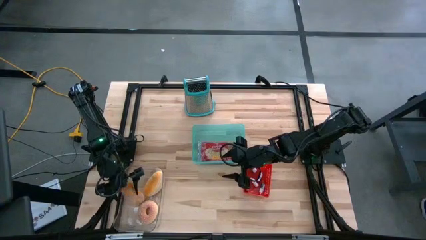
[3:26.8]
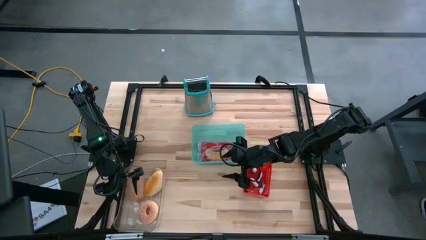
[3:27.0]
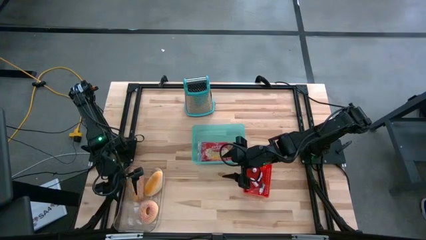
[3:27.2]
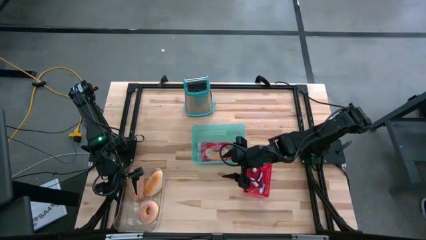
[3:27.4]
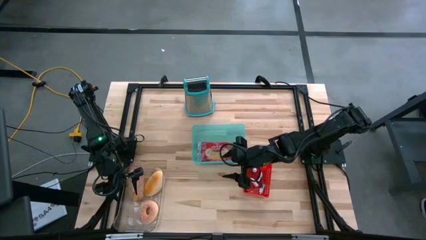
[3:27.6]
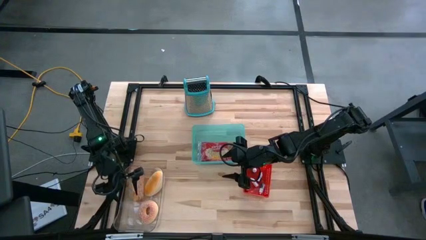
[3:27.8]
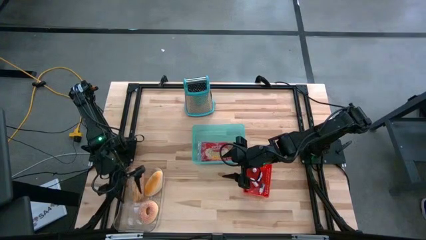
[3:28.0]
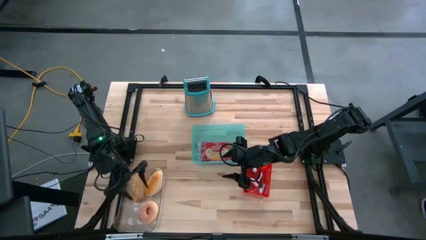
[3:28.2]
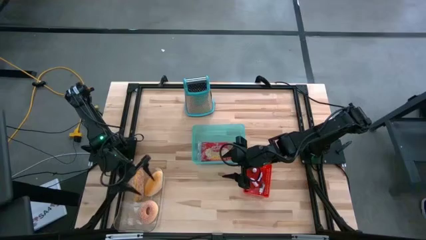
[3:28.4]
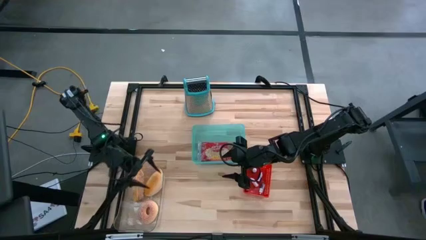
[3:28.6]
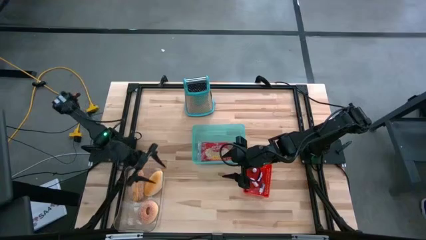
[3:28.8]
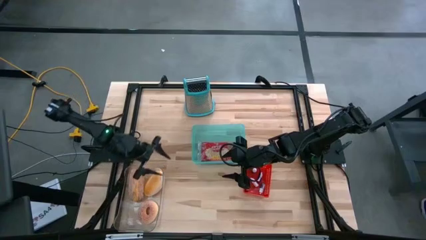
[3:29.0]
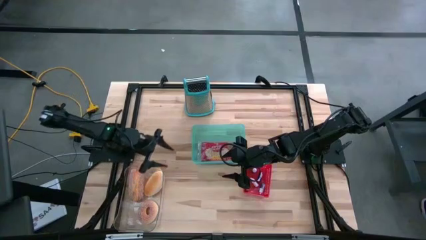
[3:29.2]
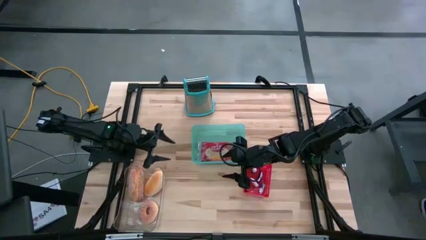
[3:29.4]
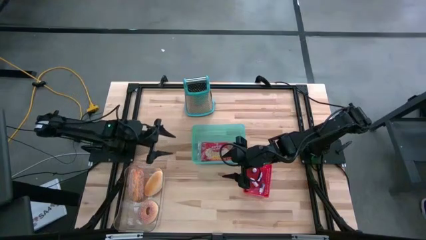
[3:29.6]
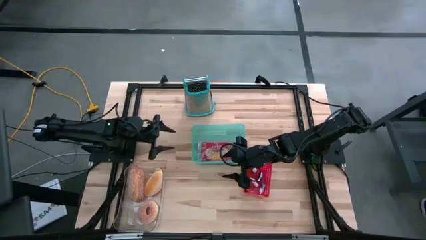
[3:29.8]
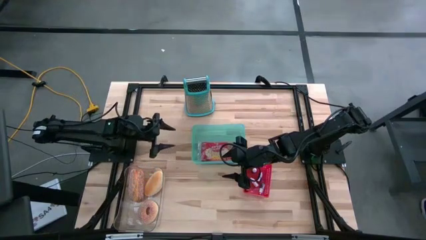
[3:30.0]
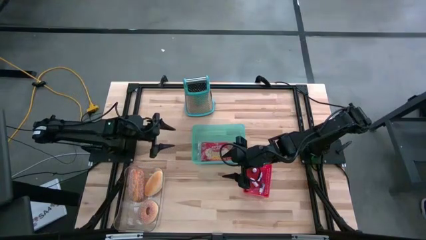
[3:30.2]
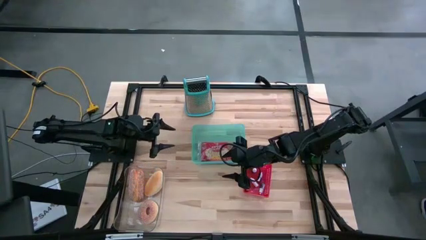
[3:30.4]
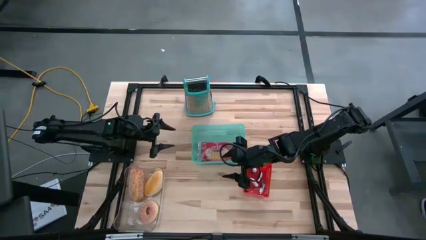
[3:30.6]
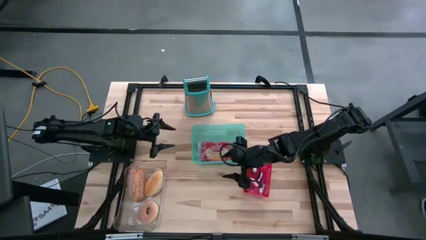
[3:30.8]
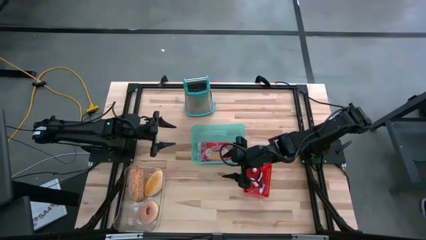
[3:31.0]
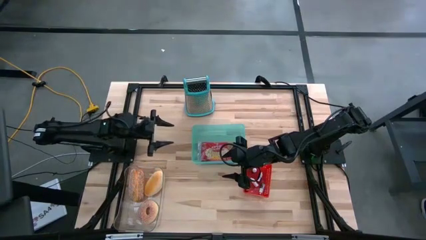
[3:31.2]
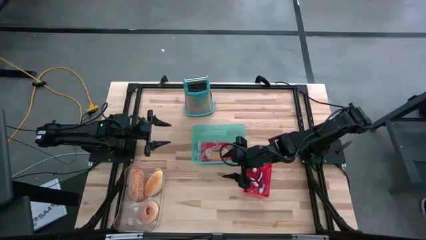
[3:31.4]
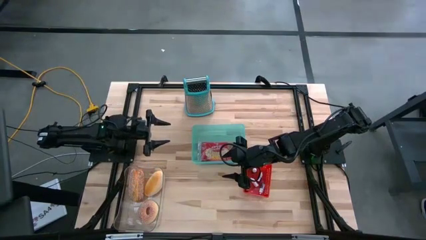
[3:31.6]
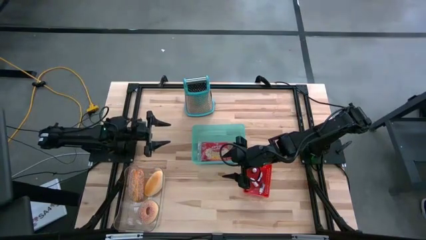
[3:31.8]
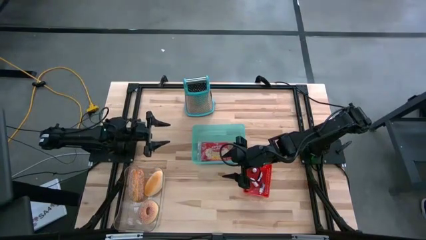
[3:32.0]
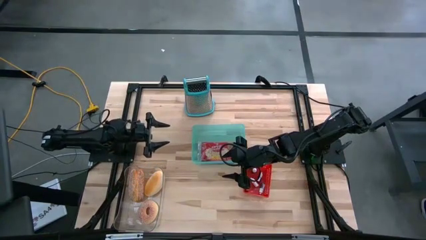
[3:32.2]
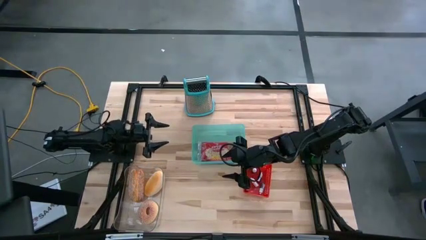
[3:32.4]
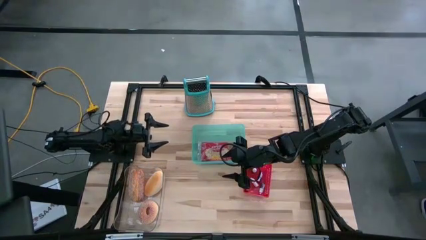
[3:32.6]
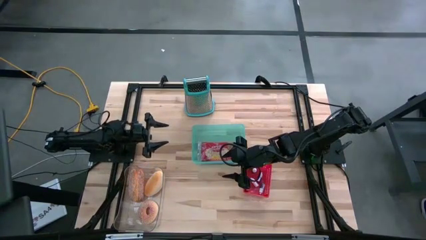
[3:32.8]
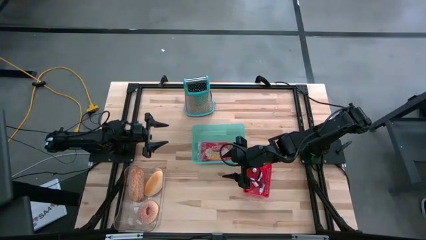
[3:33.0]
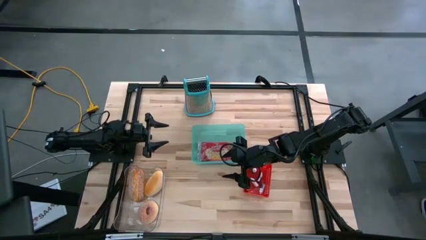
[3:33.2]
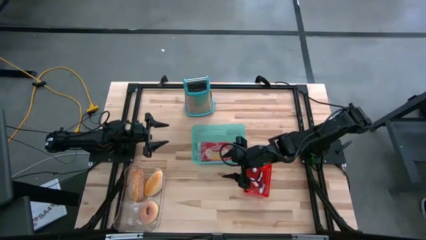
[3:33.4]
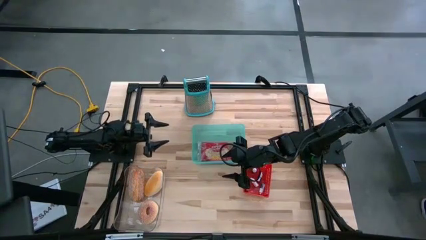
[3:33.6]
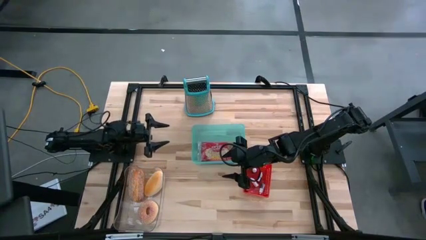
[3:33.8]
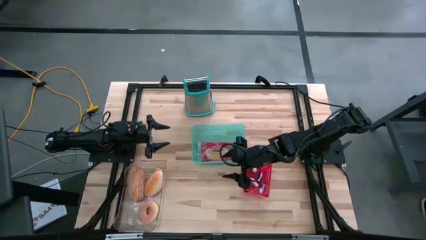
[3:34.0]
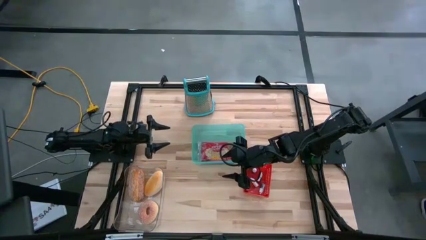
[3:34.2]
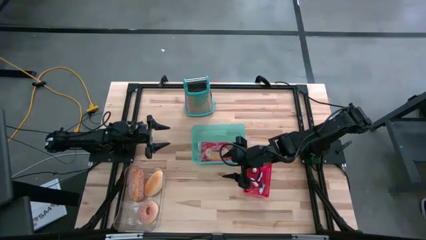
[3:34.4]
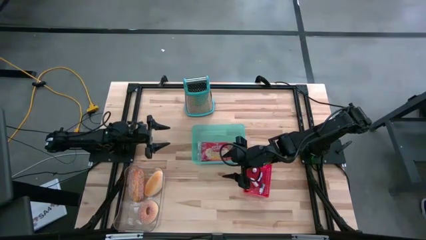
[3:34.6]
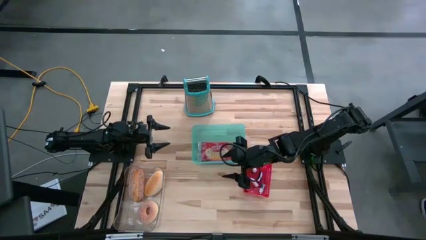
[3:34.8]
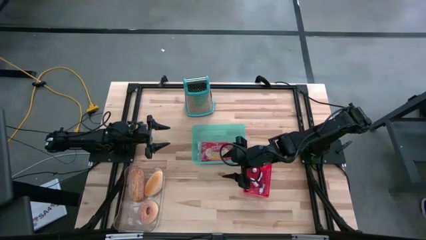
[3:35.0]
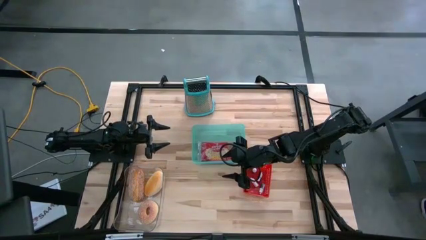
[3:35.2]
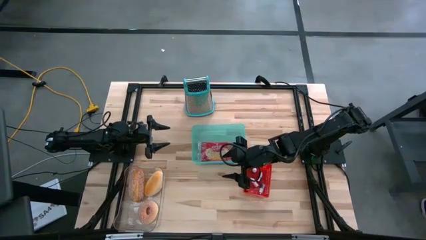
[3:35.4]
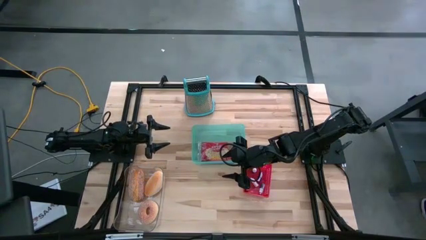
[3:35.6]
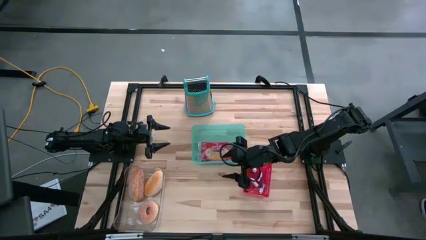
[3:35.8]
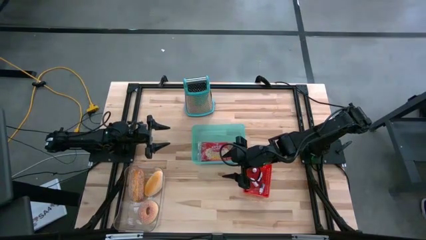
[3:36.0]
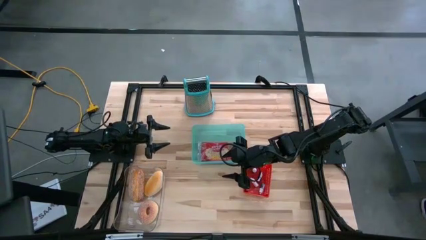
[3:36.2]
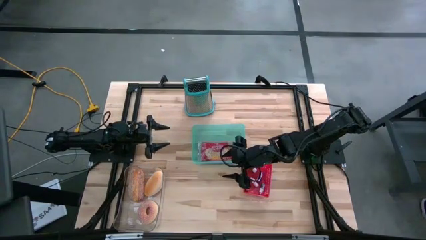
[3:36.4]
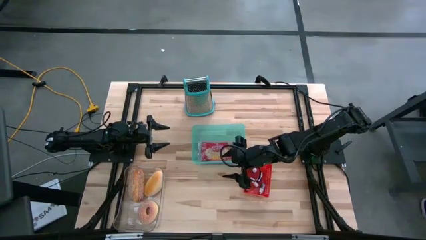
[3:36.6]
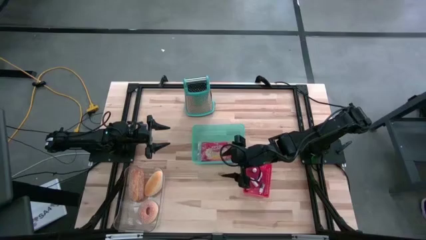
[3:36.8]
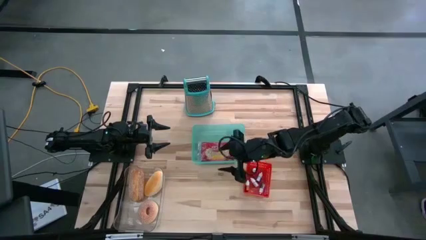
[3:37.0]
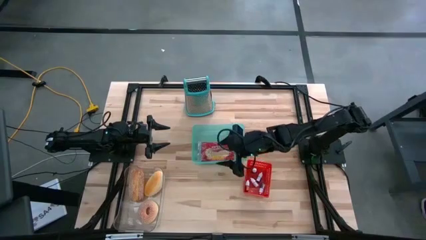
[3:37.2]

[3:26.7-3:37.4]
Task: Pick & Place Food Item
Return to Home Position

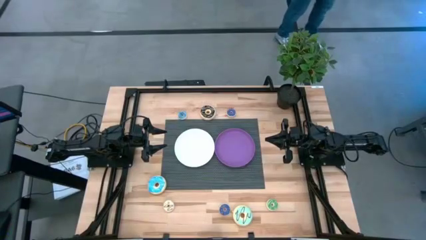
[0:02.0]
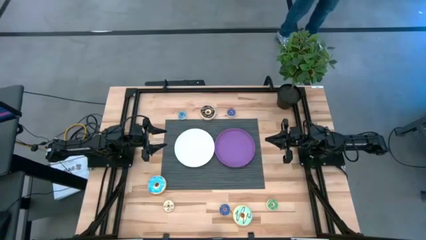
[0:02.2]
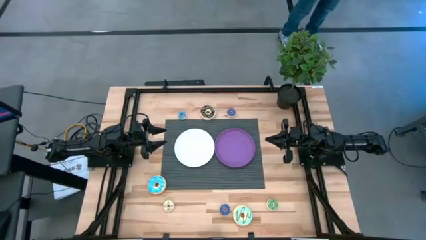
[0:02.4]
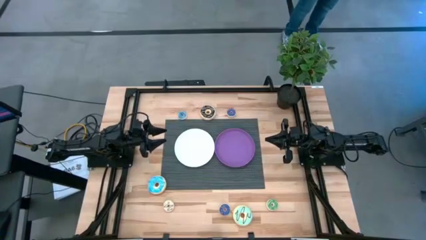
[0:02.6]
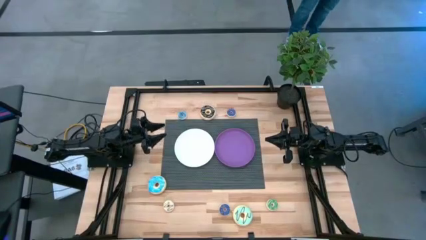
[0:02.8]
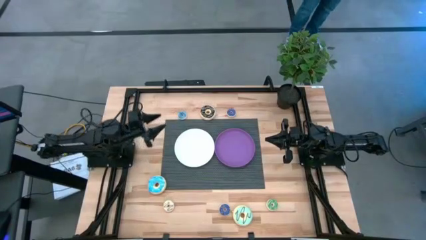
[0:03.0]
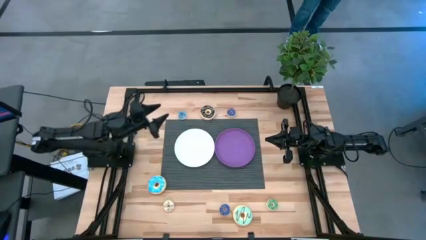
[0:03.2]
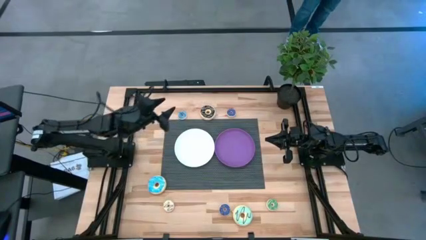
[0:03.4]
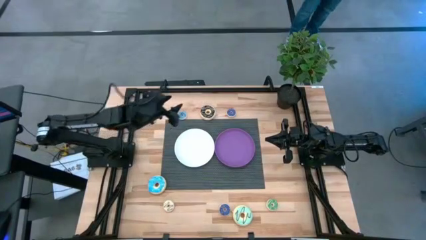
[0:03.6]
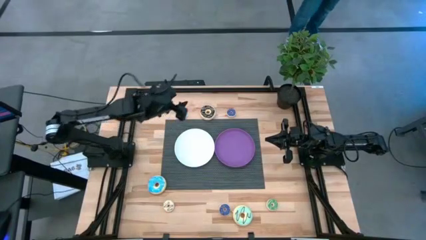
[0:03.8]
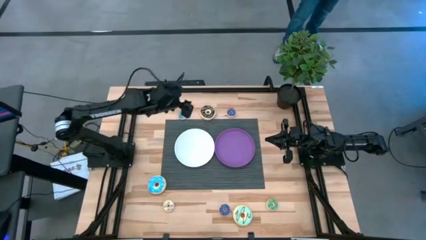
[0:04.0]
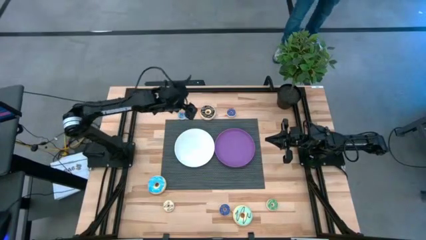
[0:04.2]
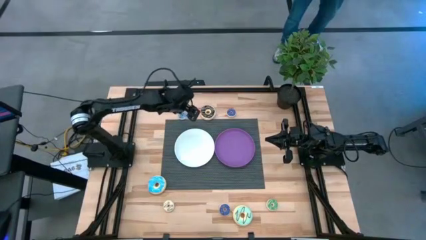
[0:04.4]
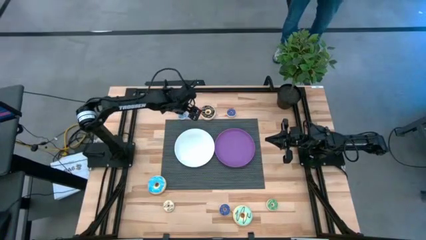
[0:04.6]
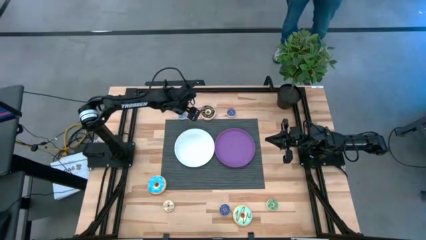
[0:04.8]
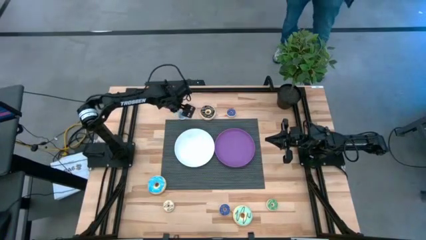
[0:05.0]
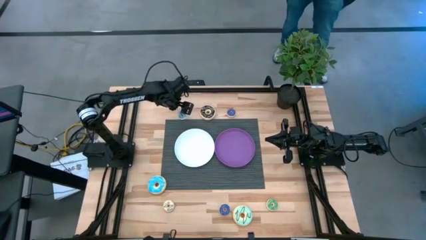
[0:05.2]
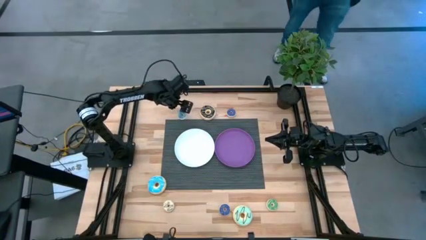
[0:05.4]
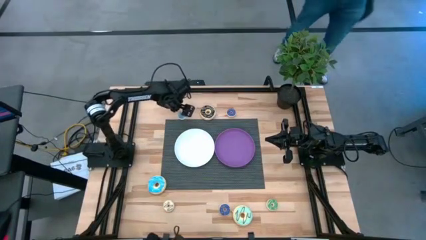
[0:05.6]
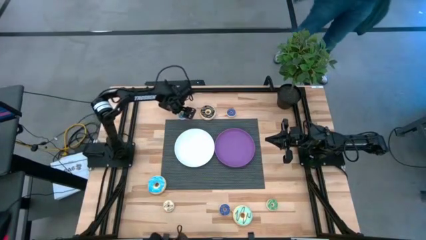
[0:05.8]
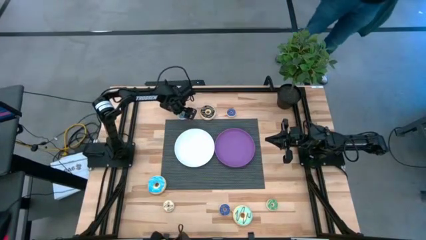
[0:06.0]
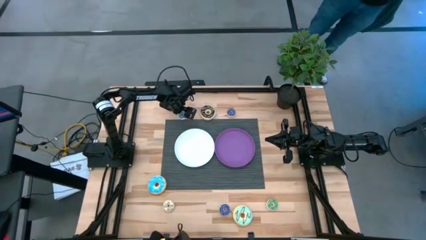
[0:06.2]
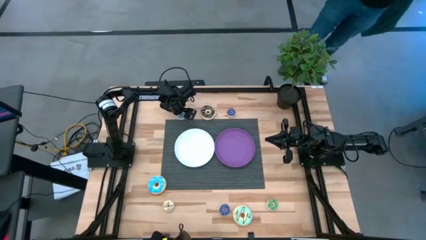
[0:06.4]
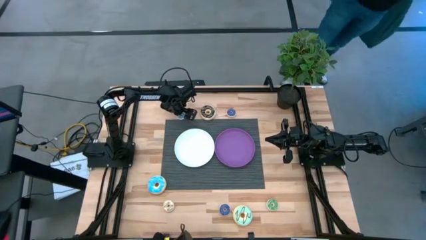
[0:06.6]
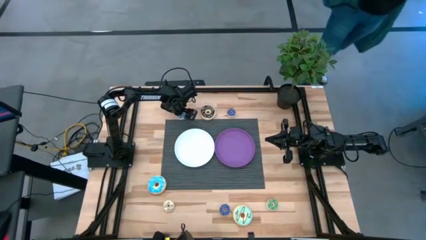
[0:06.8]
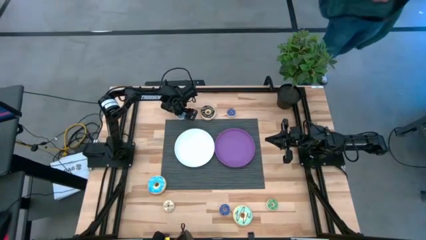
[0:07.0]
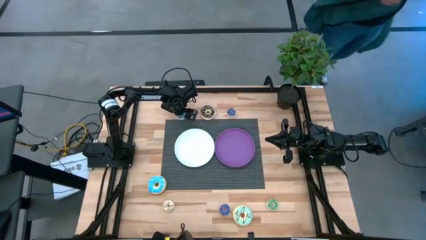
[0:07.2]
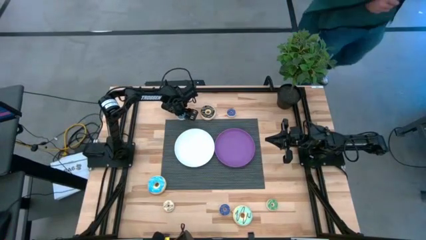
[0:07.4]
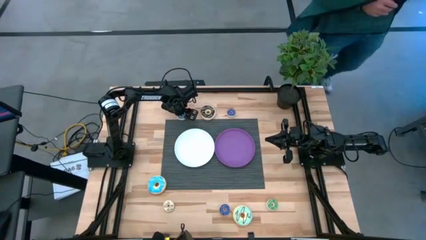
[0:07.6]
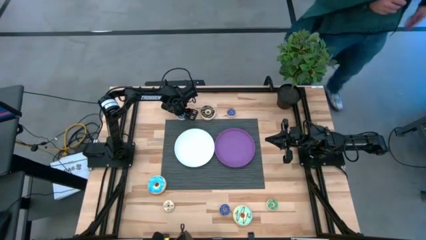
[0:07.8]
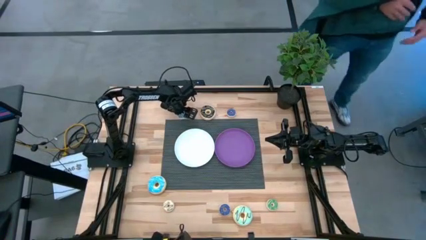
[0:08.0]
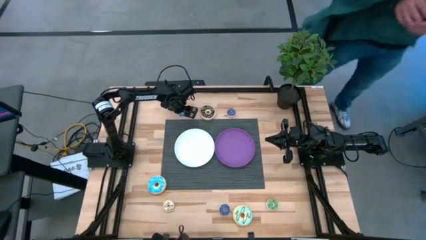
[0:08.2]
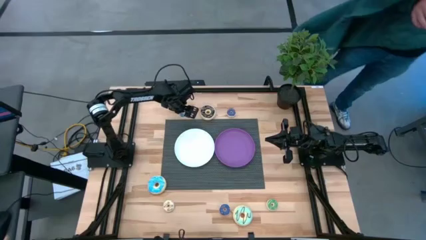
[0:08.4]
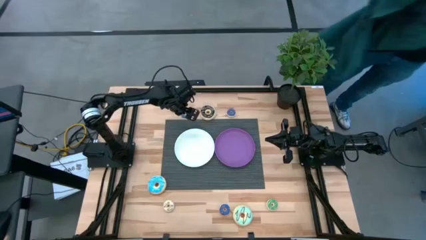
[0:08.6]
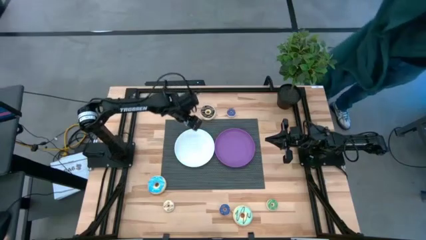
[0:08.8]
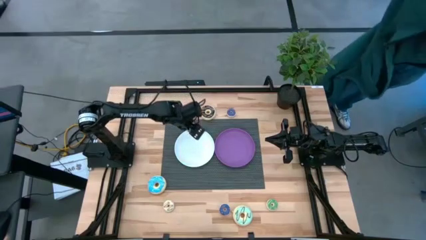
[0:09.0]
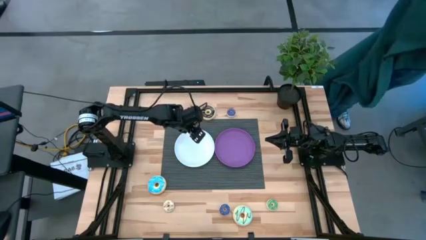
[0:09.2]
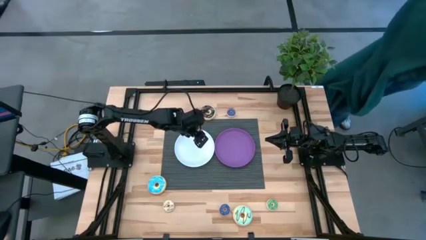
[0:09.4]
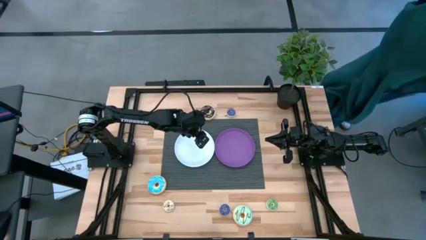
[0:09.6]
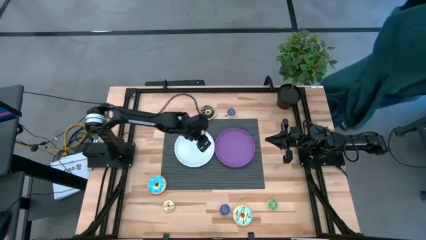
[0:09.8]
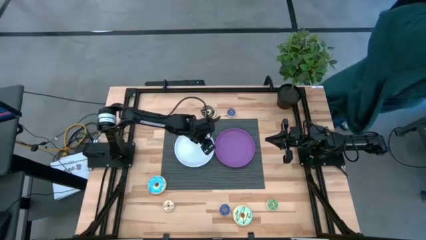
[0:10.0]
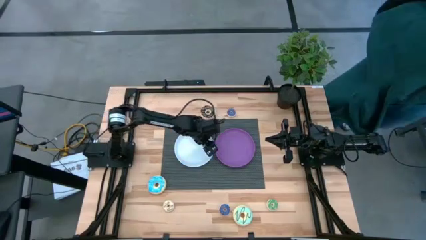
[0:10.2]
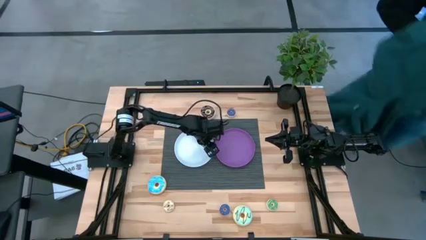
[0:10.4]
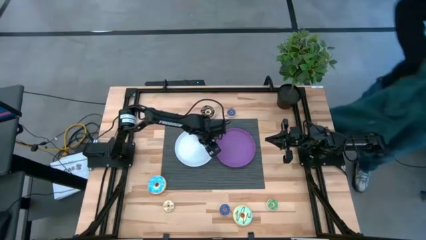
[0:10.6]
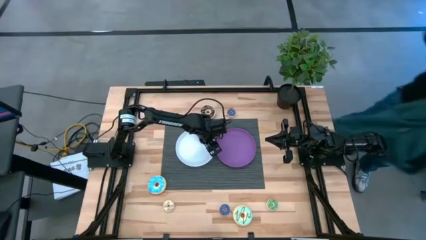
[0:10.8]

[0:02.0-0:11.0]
Task: Pick & Place donuts
Put the small light blue donut on the white plate
